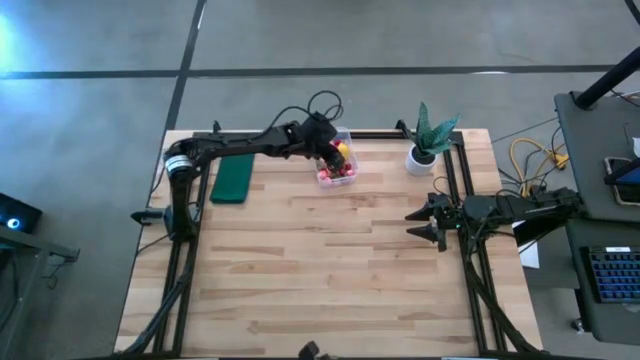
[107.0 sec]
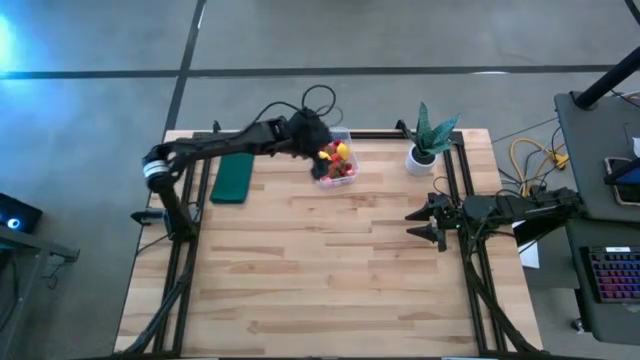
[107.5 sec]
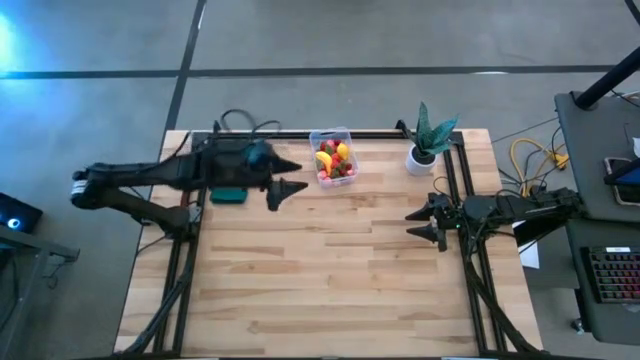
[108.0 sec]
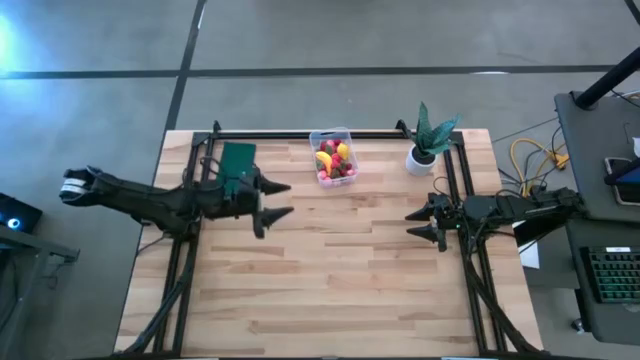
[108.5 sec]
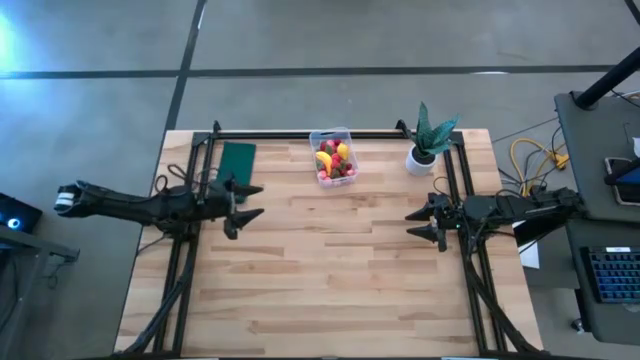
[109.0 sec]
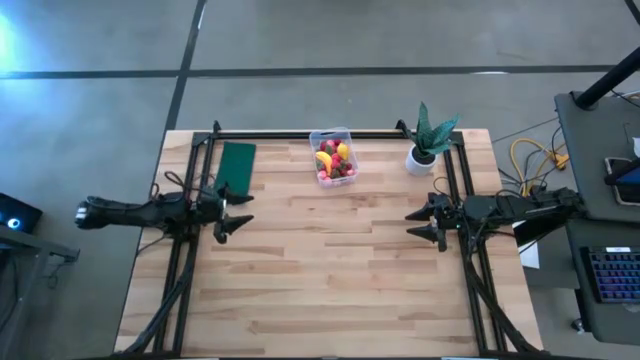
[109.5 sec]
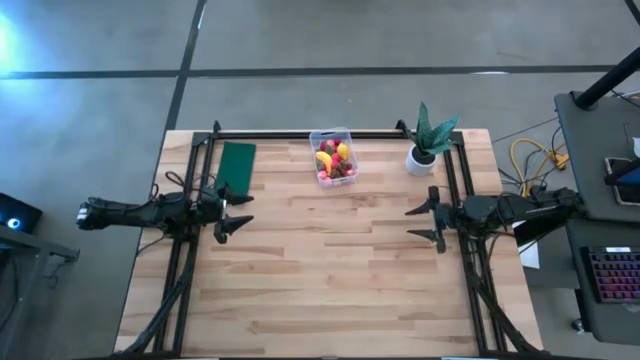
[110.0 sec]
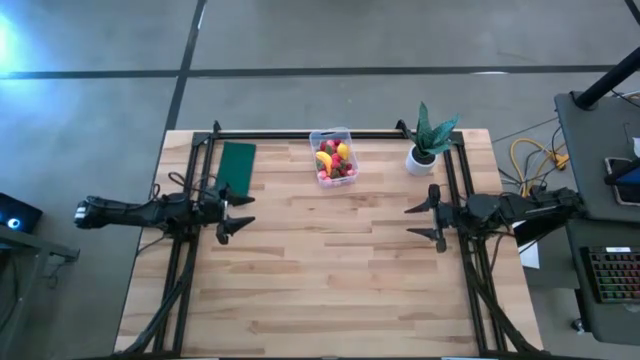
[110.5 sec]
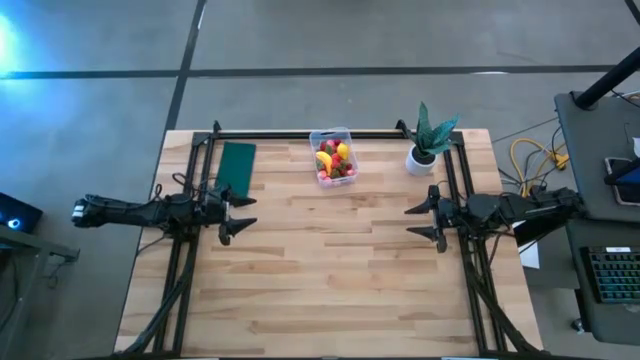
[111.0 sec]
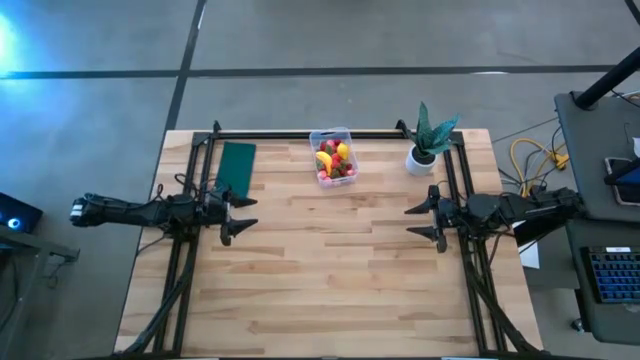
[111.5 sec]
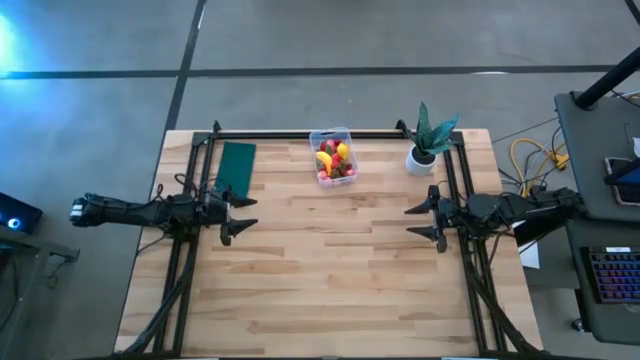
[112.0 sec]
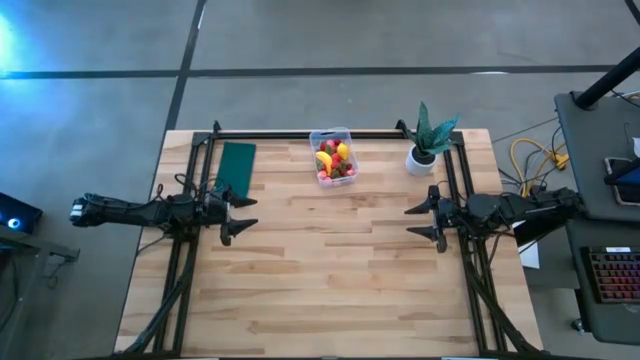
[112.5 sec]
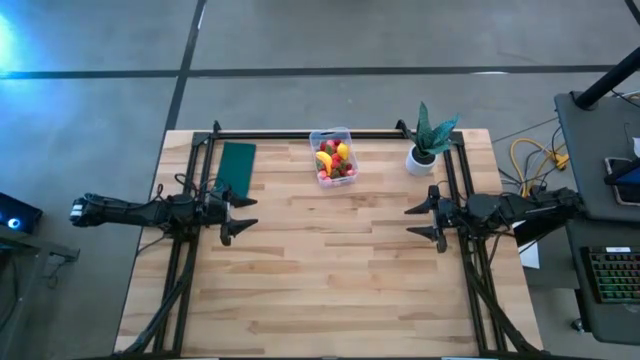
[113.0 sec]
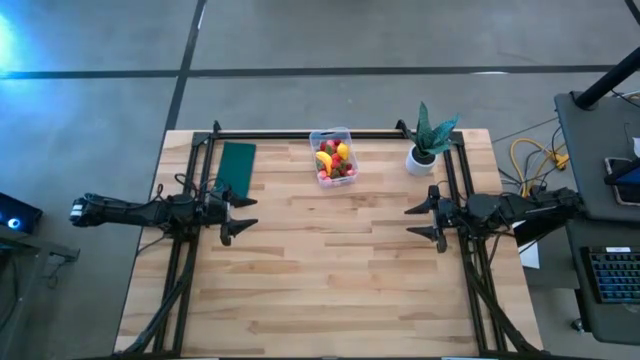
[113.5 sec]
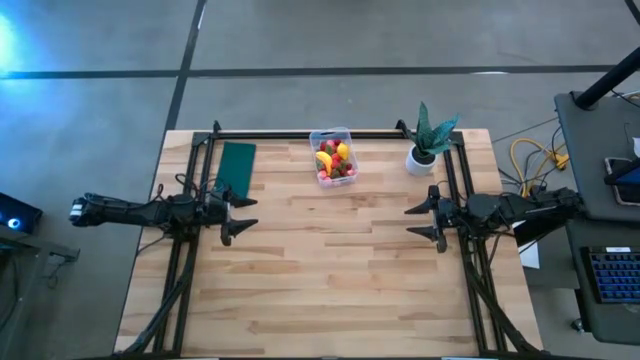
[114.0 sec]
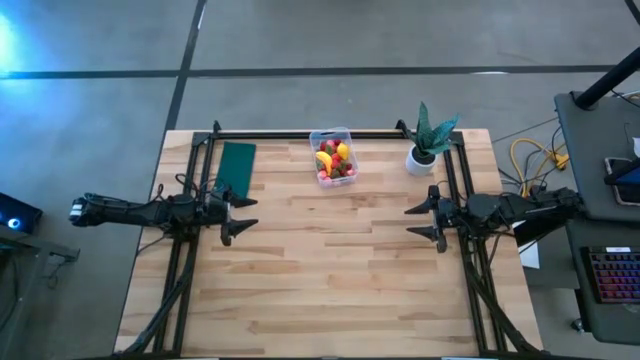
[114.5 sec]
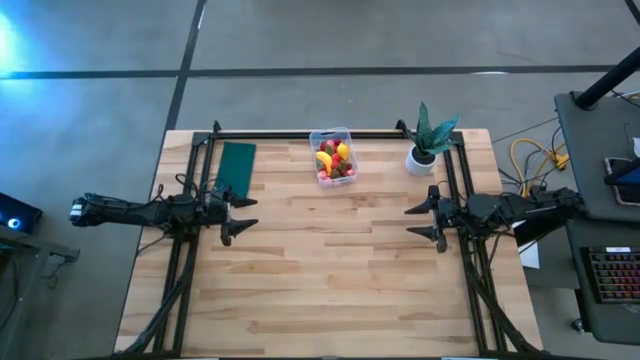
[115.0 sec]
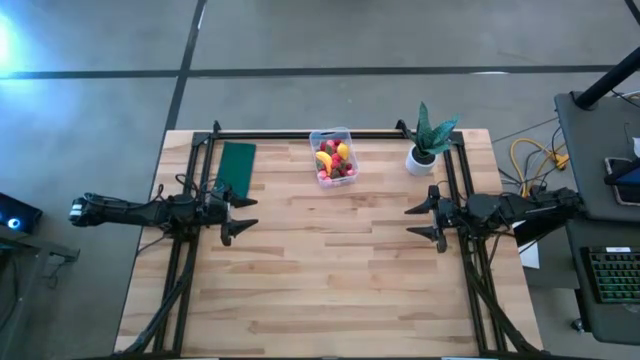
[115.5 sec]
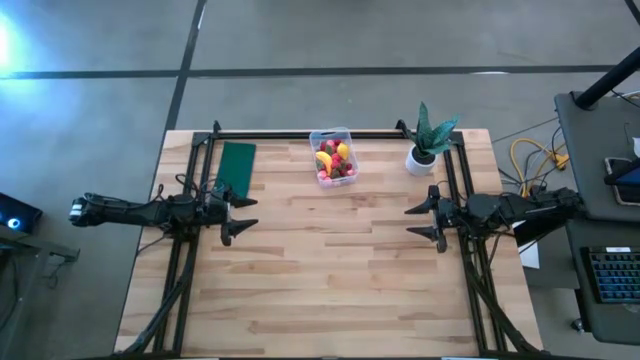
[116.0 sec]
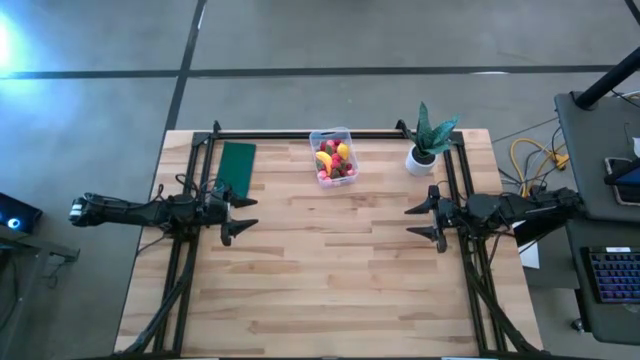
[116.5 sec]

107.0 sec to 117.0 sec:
Task: Pick and placing Produce into tupperware
Return to Home Position

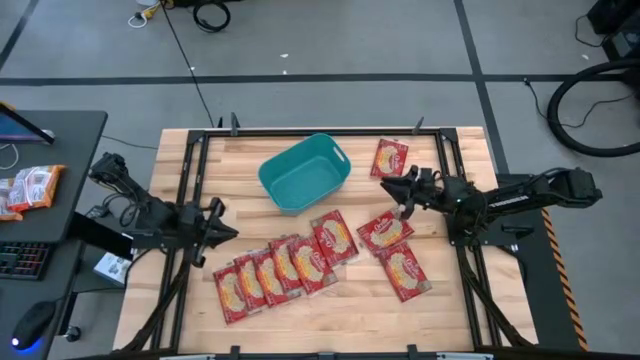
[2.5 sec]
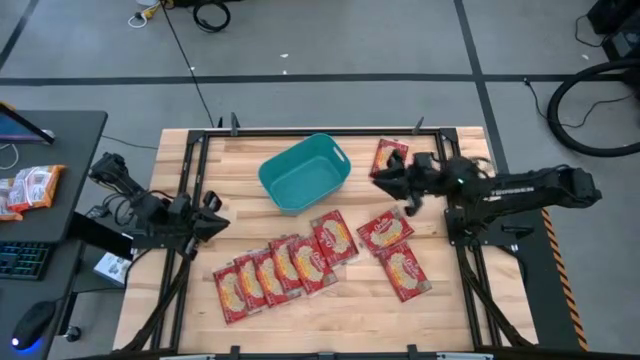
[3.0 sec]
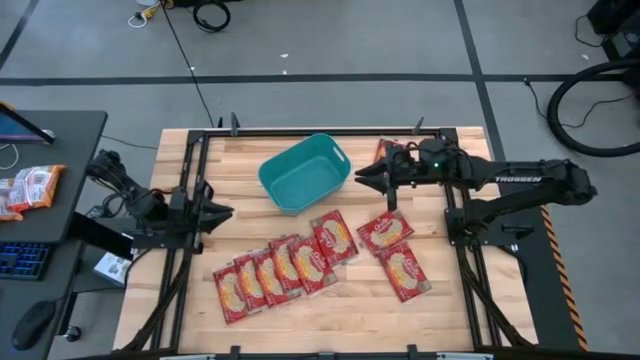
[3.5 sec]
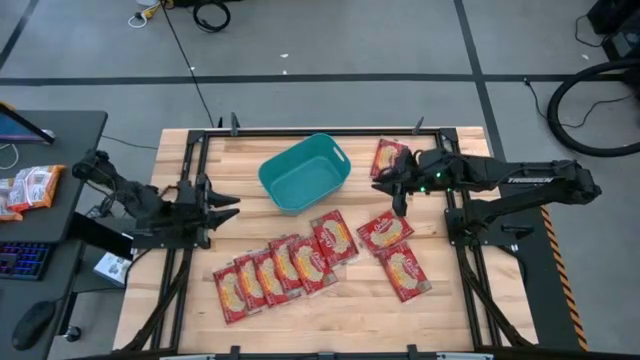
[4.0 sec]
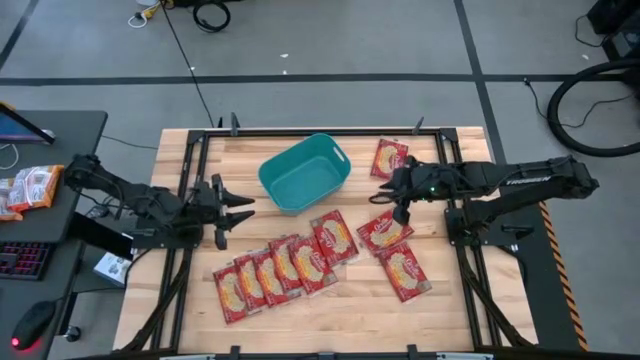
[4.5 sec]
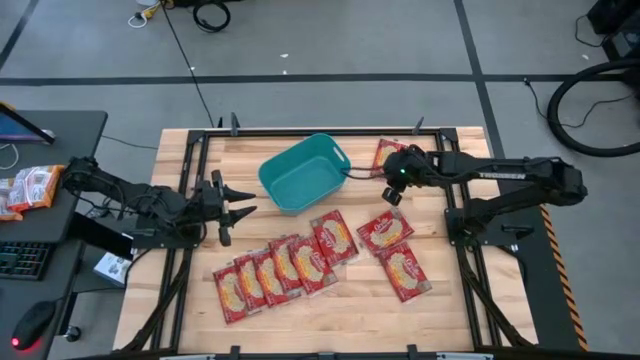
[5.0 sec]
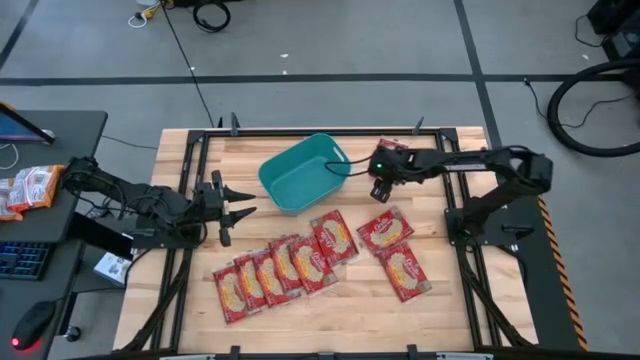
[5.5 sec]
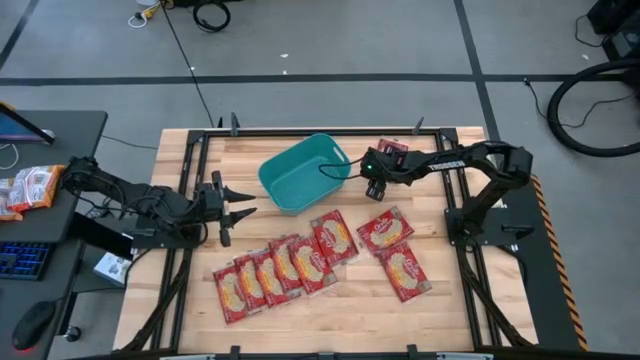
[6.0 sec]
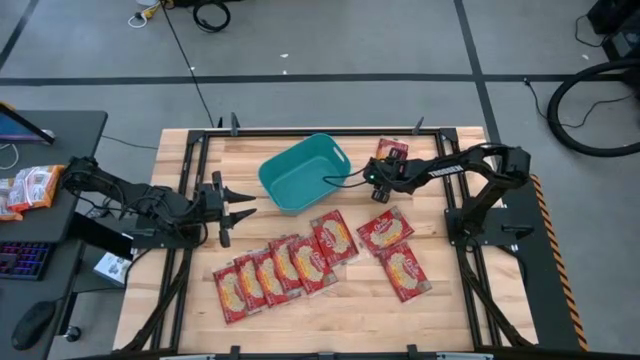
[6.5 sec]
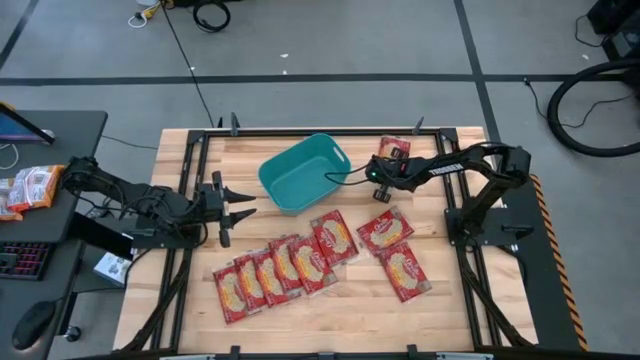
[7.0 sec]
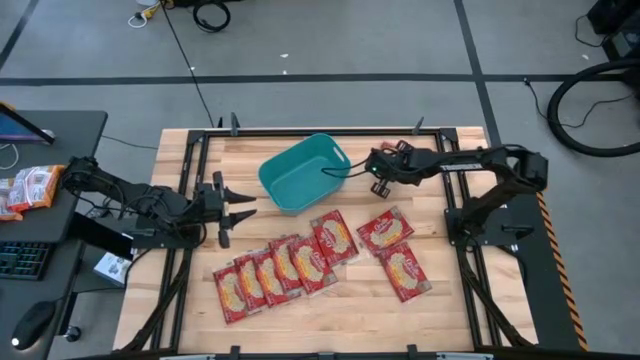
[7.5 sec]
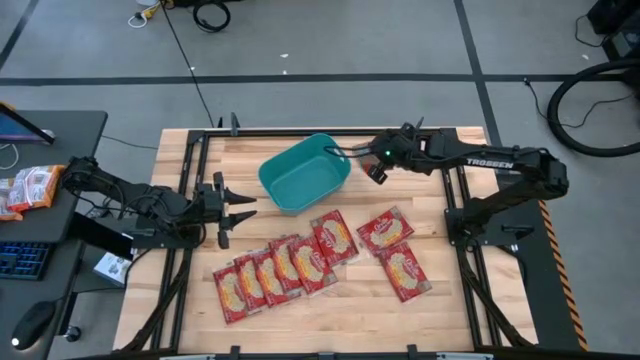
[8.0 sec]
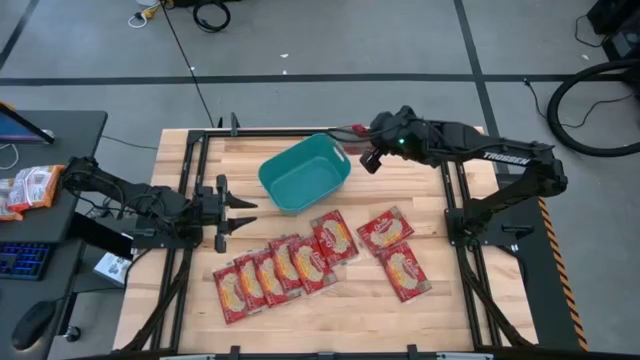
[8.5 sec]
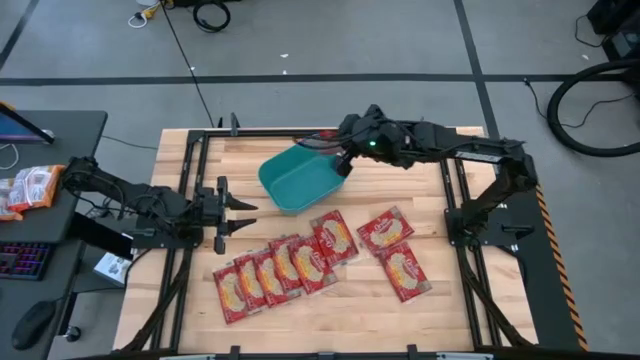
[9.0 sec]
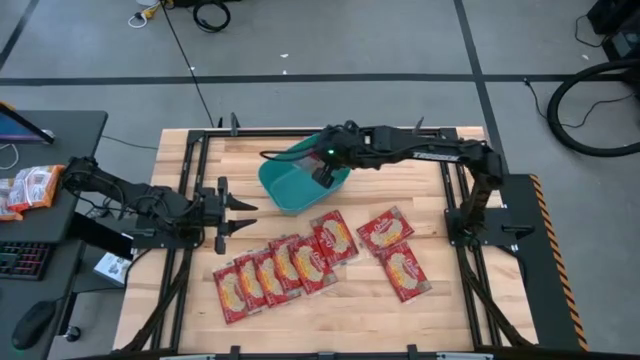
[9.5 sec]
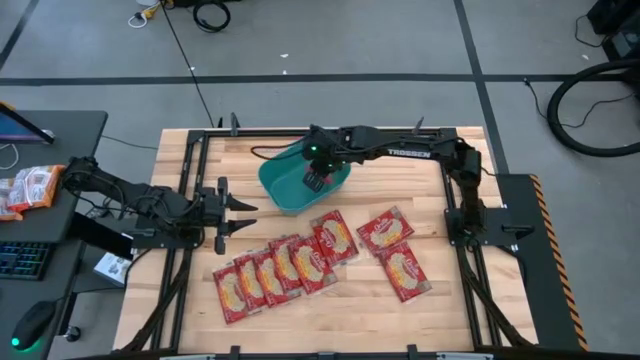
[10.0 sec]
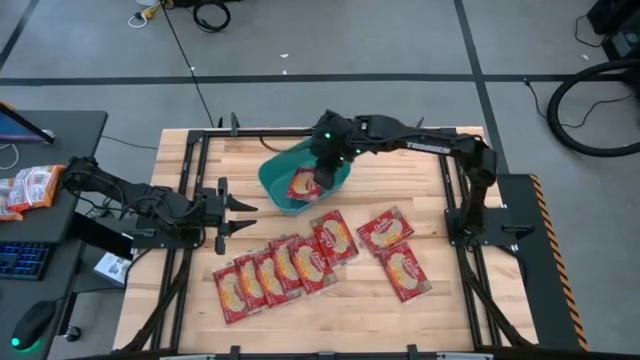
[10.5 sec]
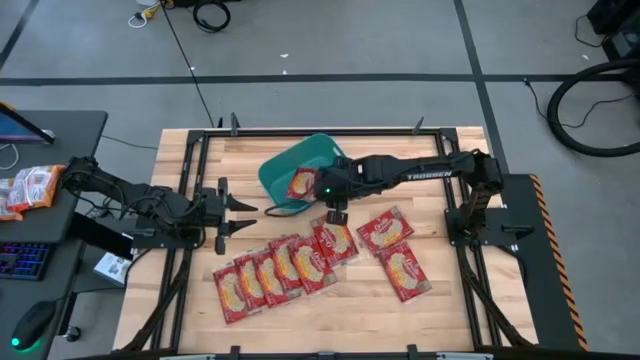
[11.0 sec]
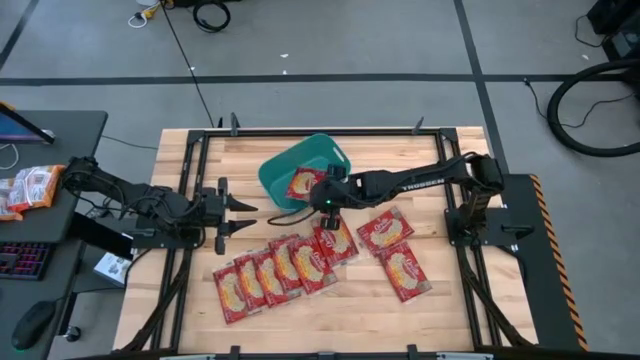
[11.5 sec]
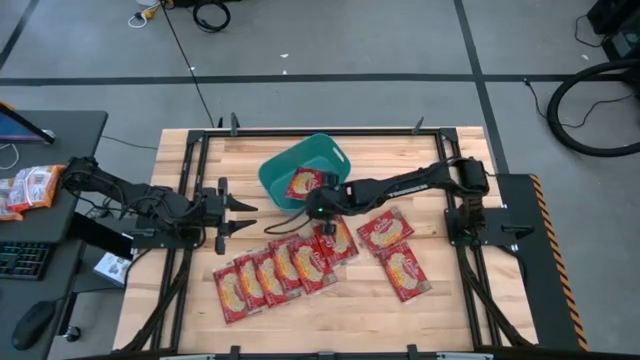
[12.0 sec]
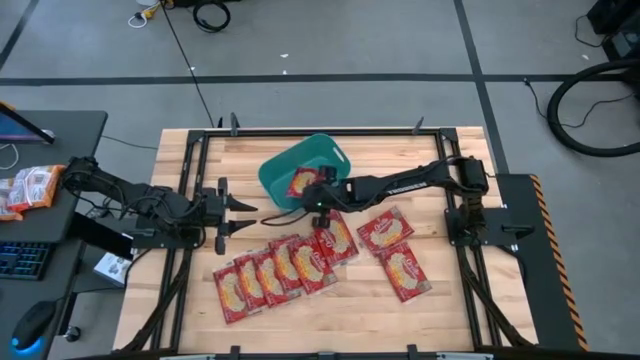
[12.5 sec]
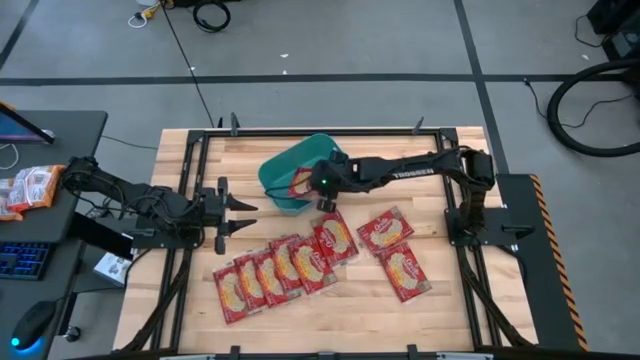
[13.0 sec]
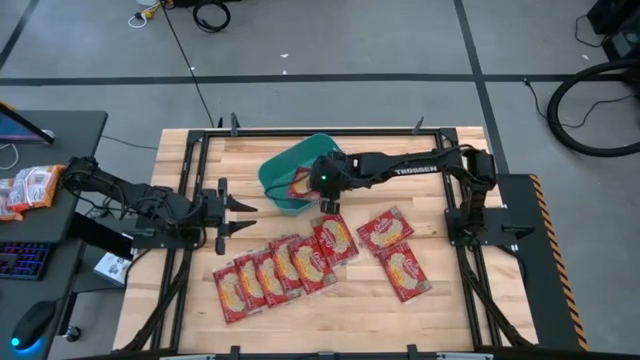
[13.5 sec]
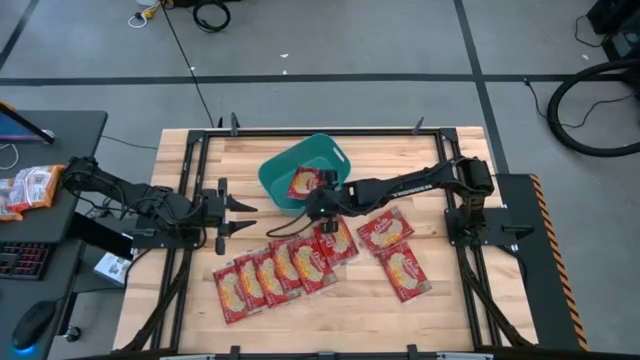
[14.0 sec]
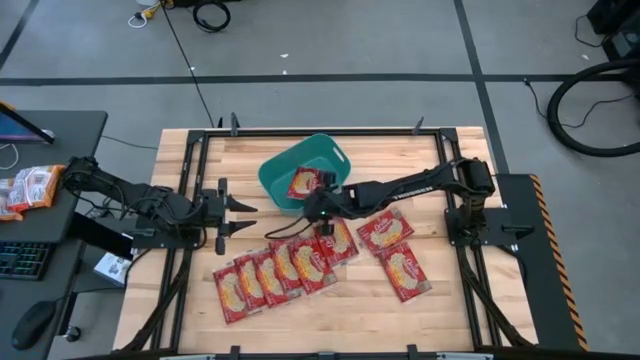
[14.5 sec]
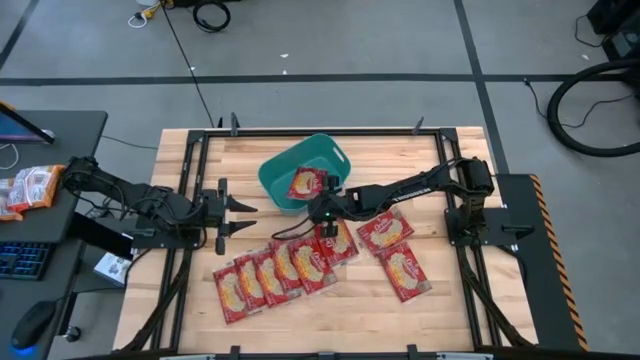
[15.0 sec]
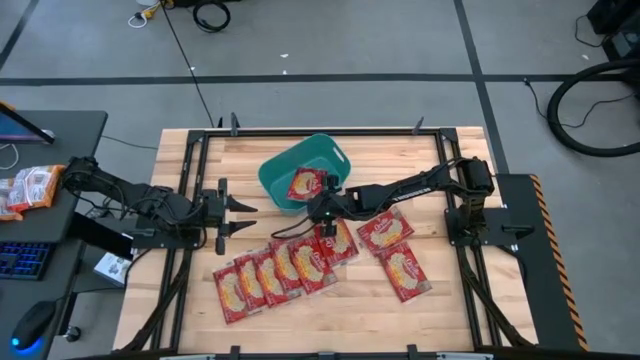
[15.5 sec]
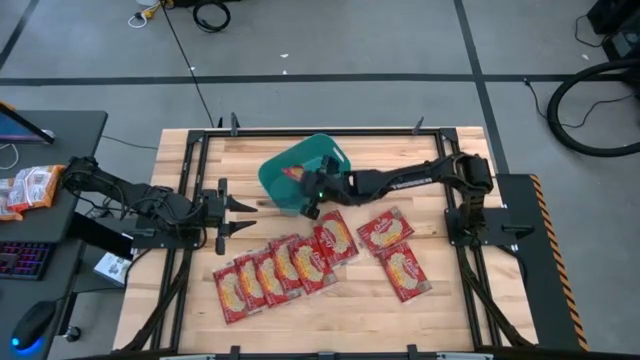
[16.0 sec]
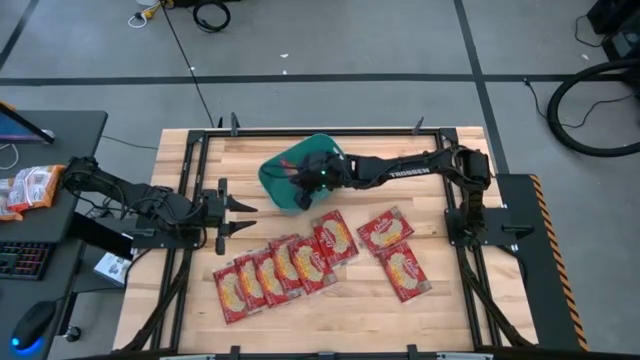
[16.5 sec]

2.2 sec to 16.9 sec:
Task: Sort popcorn bags into baskets
Put the red popcorn bag into the green bin
